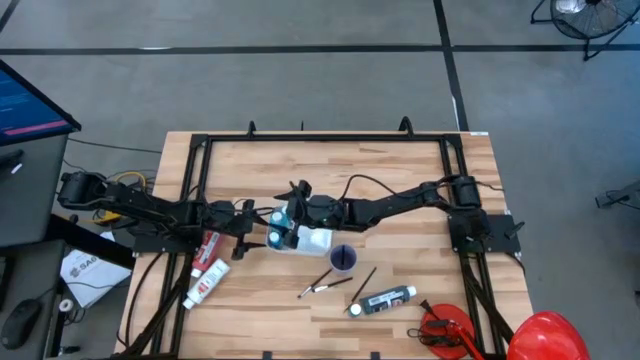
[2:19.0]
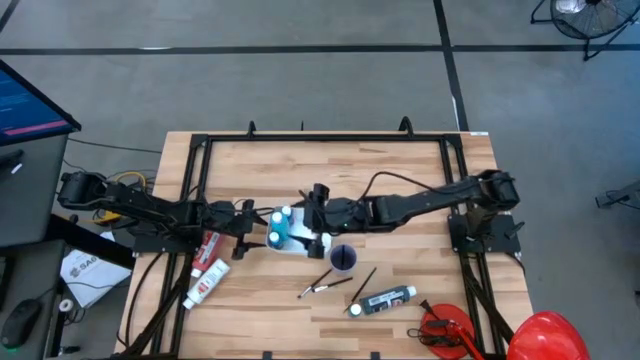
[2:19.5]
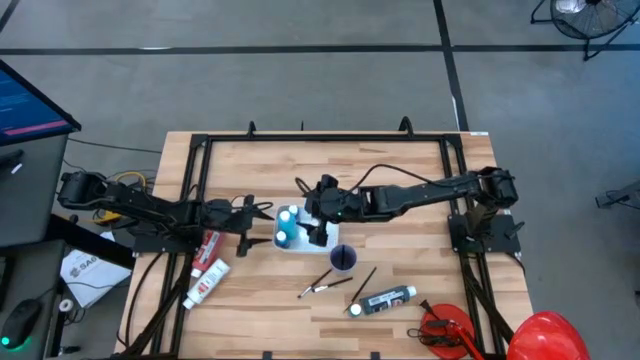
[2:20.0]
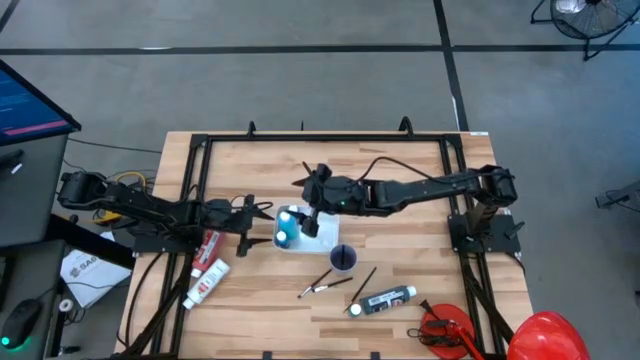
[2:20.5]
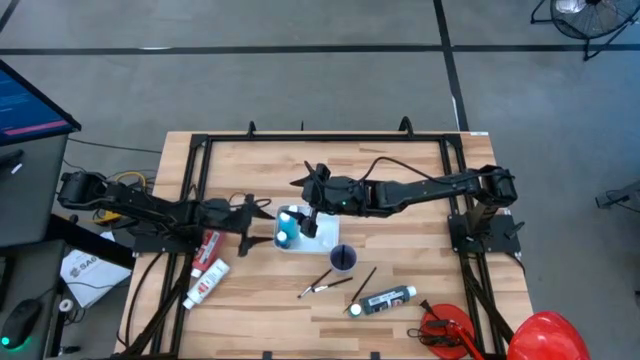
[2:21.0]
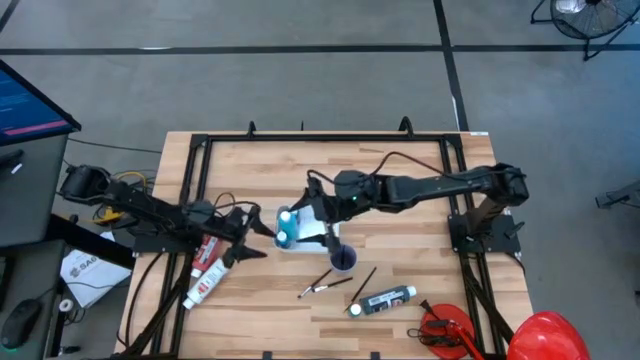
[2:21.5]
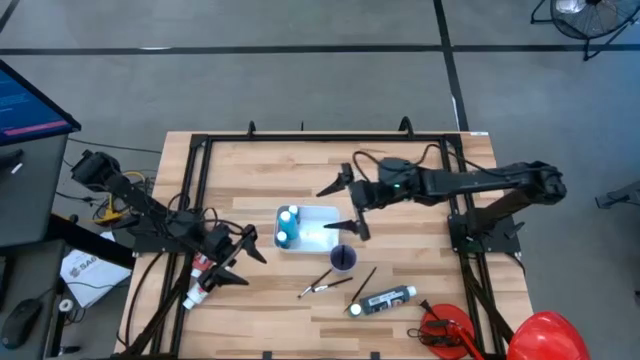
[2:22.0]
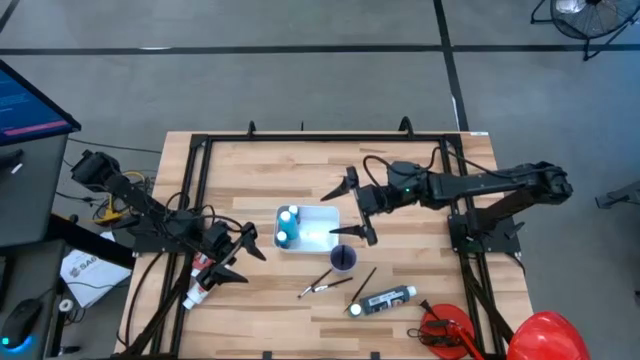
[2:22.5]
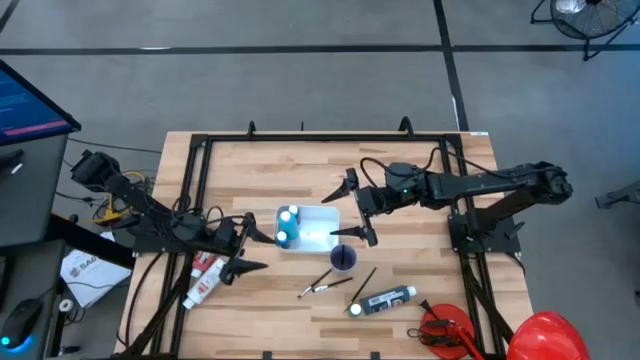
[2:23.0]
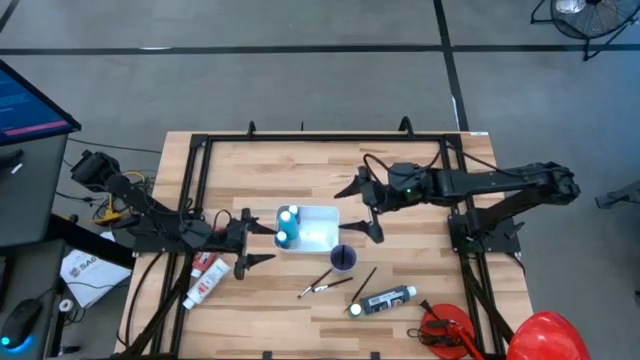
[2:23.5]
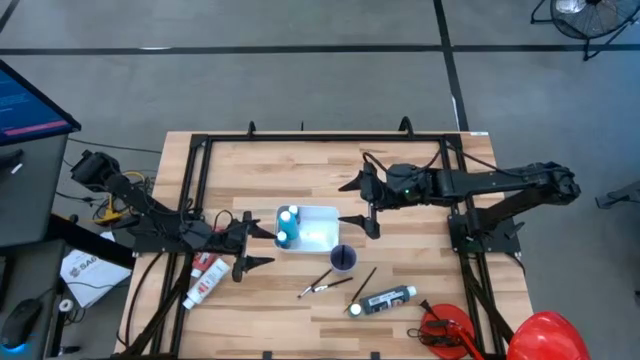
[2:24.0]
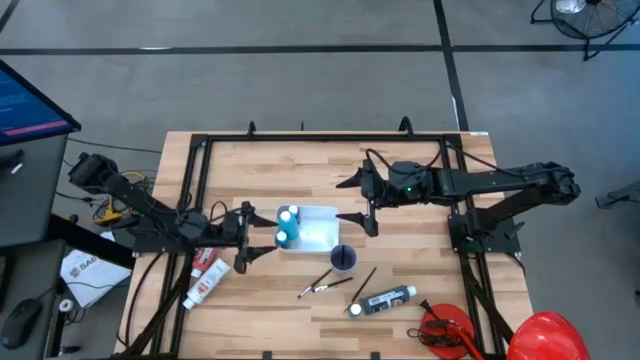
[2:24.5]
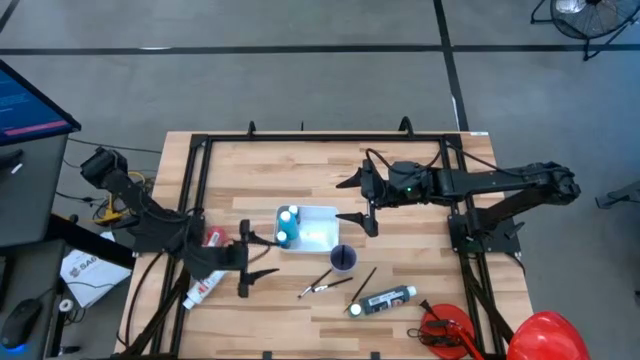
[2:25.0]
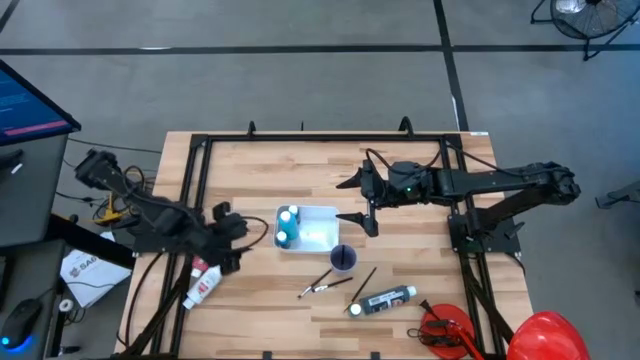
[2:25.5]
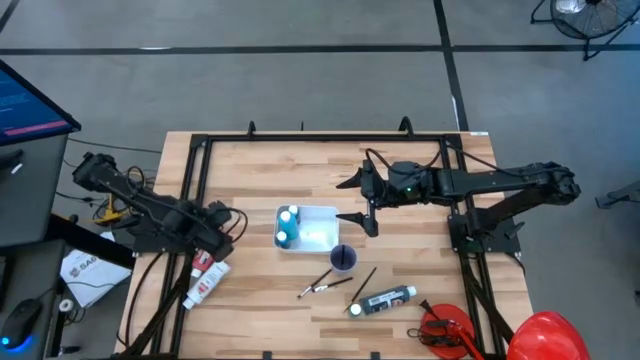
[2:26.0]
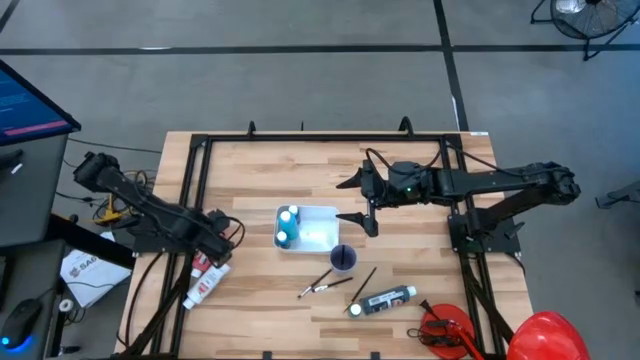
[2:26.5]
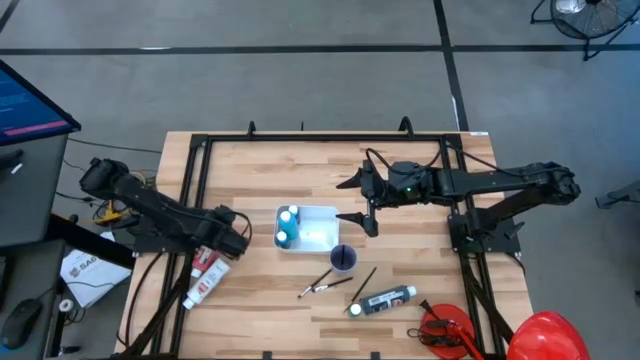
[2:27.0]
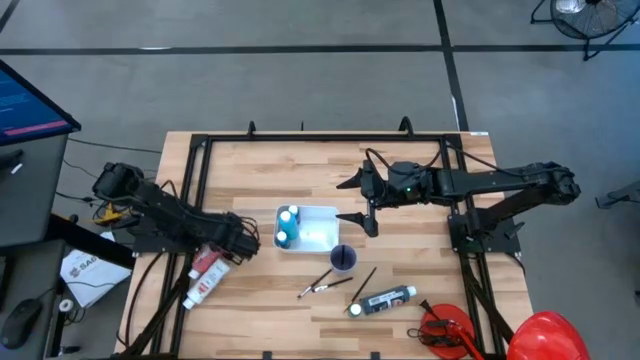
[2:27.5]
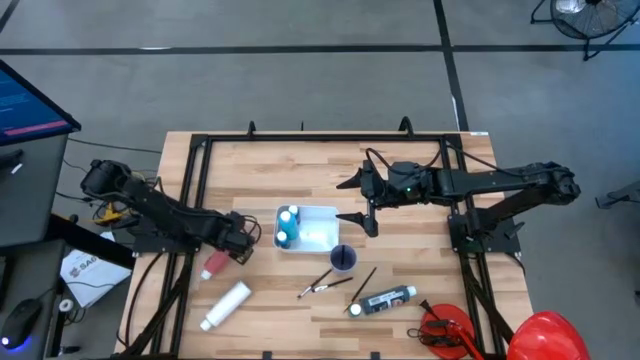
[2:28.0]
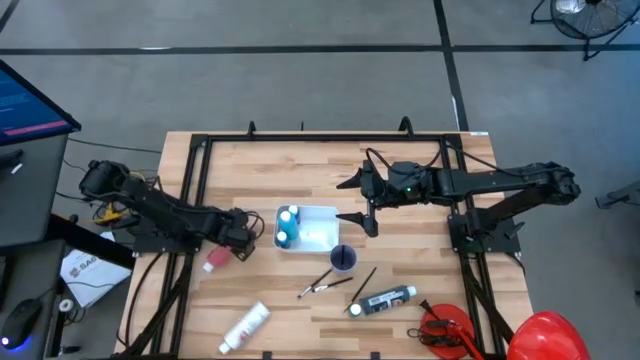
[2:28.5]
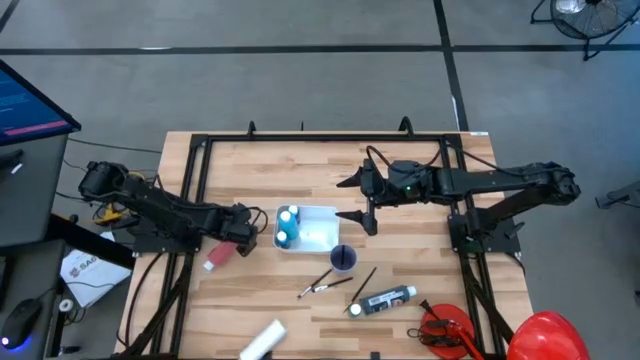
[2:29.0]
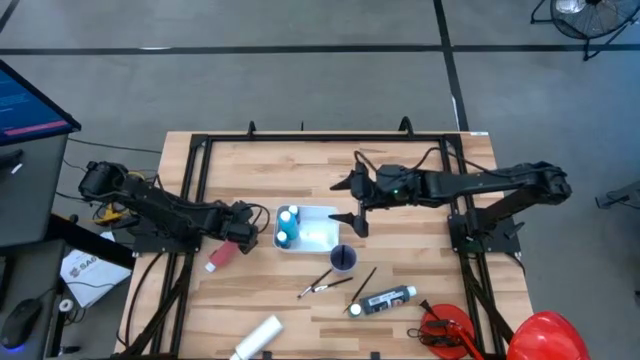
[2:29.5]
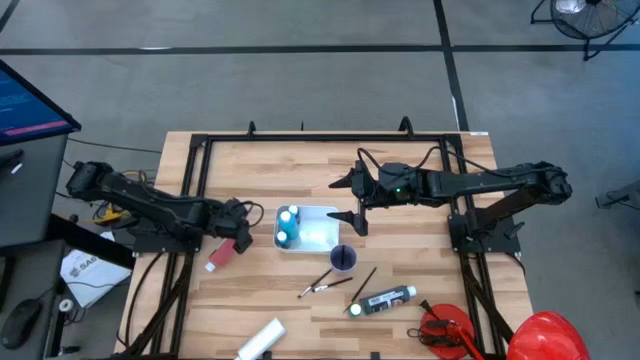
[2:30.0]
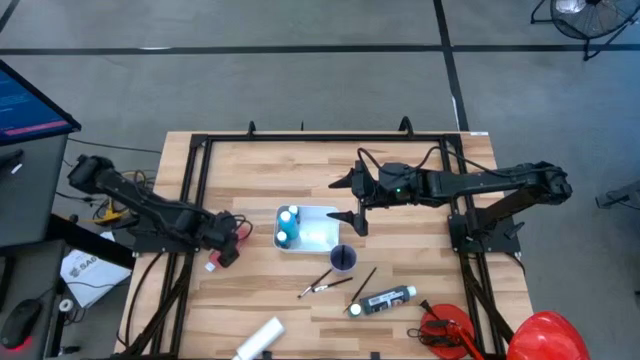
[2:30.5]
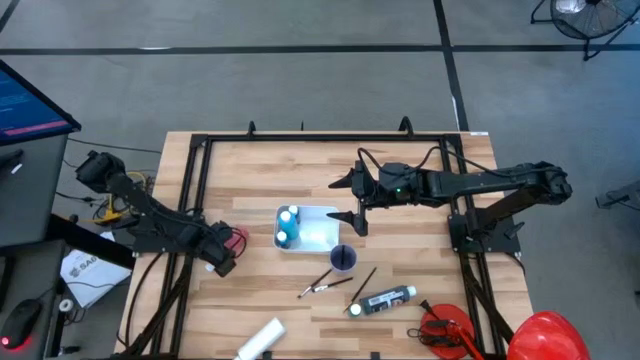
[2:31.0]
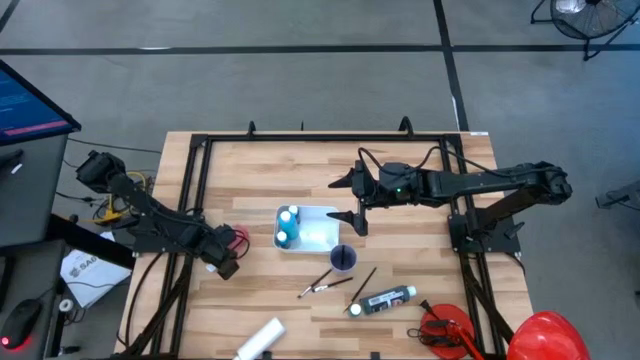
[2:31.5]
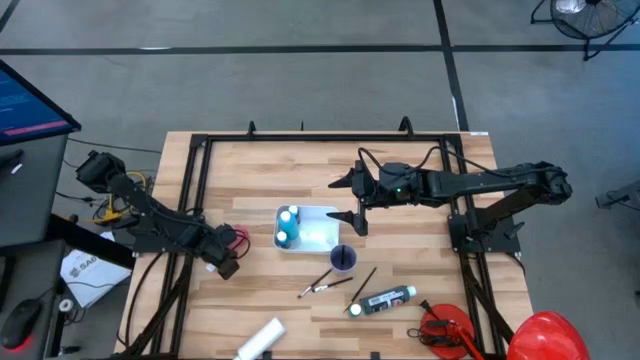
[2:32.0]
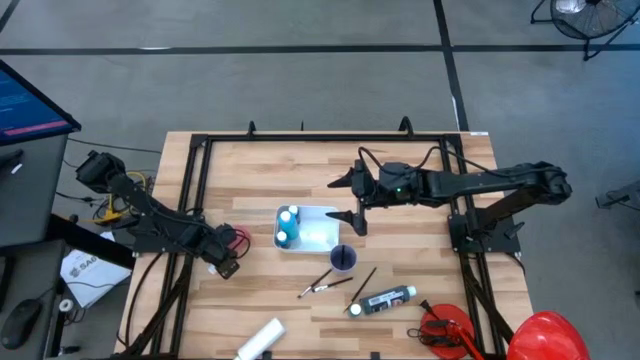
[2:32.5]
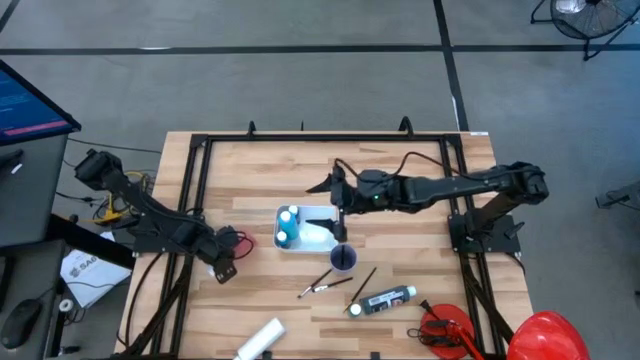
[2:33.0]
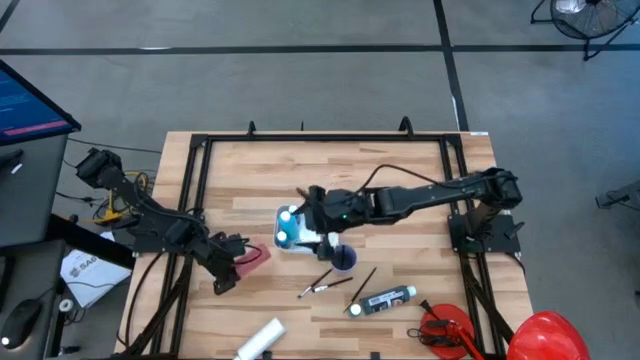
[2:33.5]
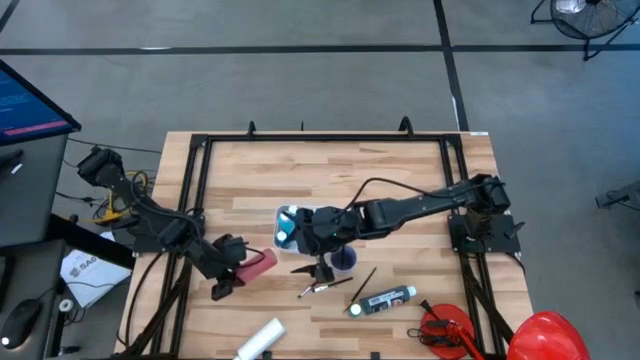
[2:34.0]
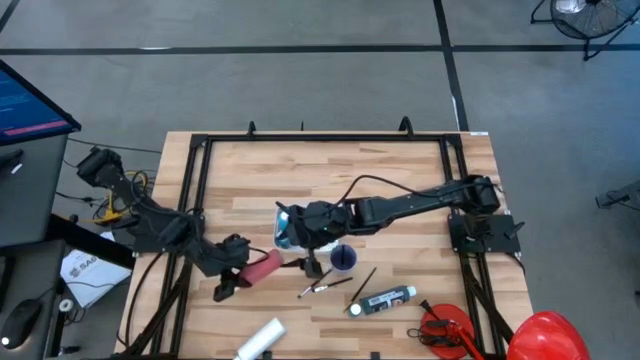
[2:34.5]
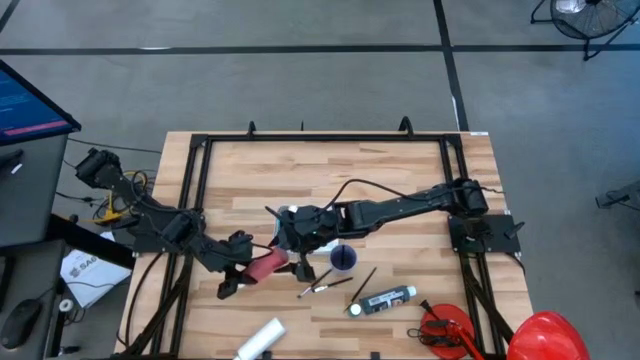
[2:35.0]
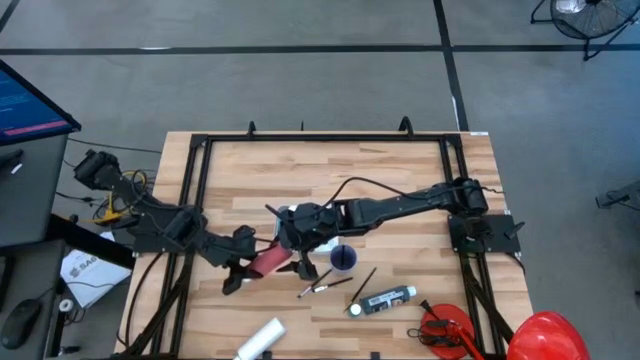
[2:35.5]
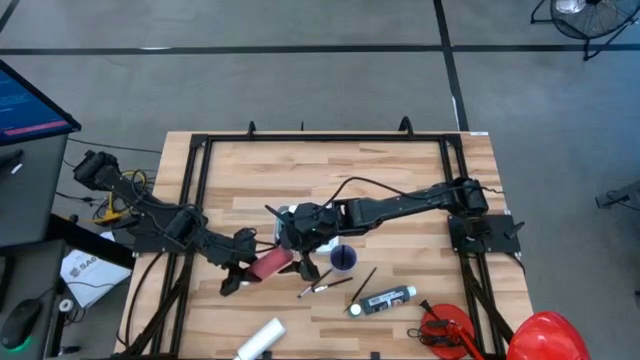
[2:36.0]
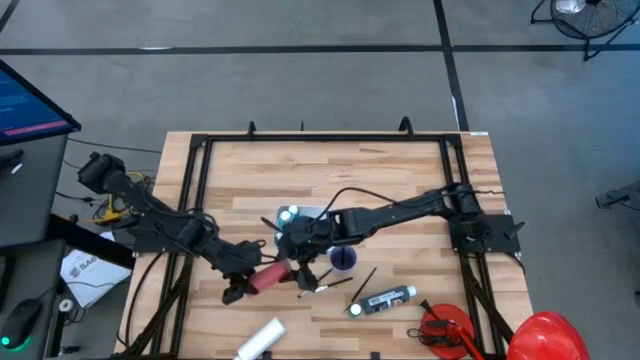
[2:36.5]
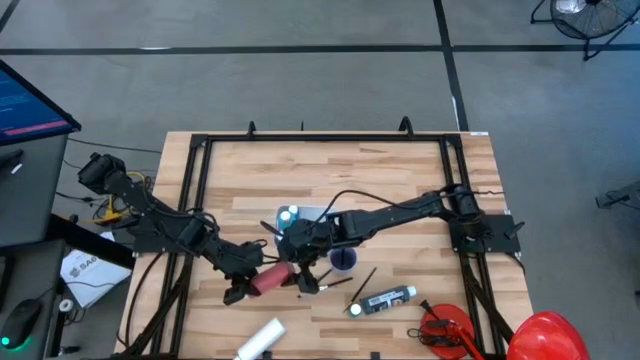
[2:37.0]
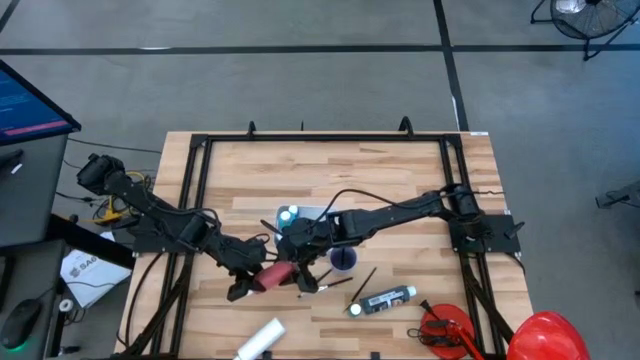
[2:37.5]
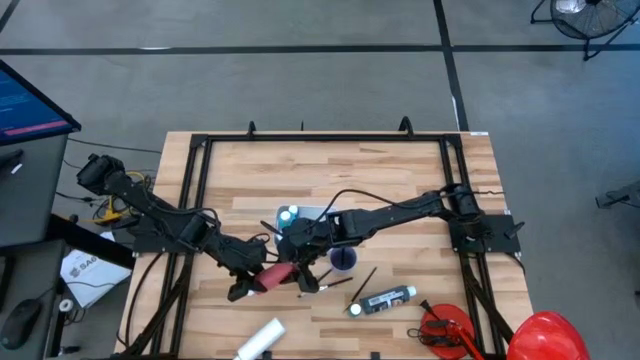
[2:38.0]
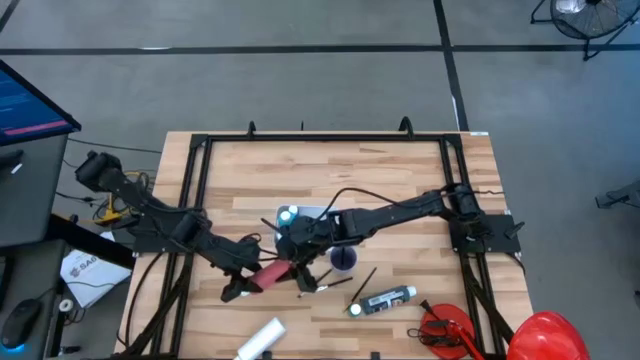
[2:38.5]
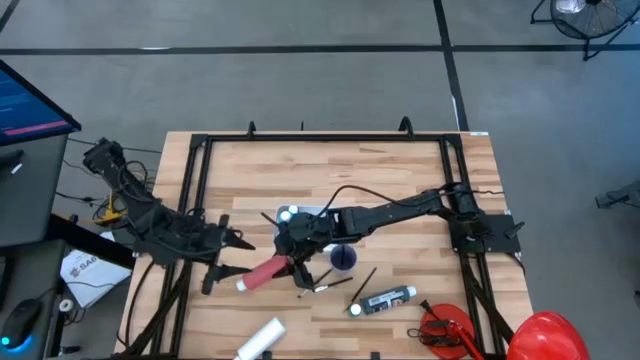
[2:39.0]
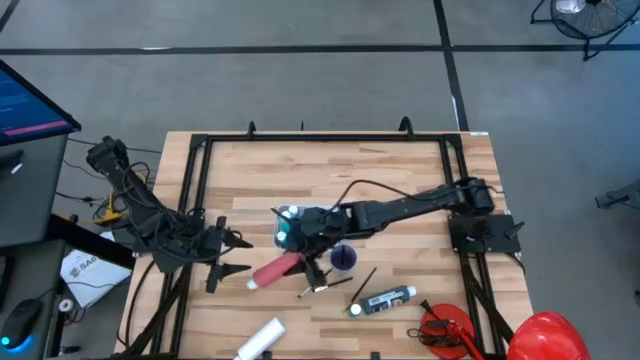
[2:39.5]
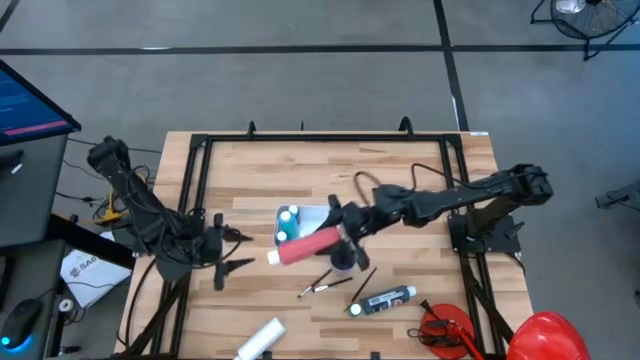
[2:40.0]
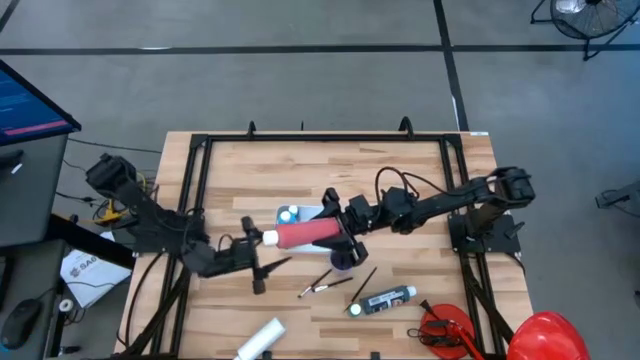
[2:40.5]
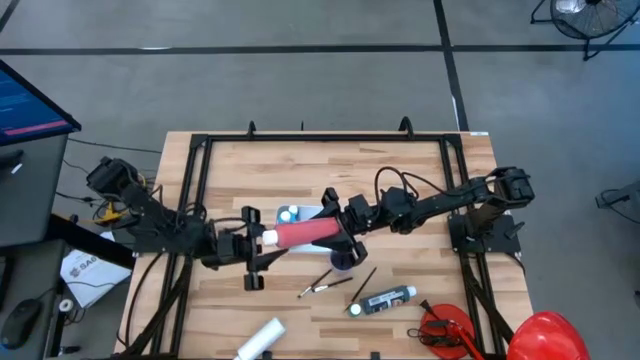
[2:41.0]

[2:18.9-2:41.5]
Task: Pick & Place Paint Supplies
Put the red paint bottle into the white bin
